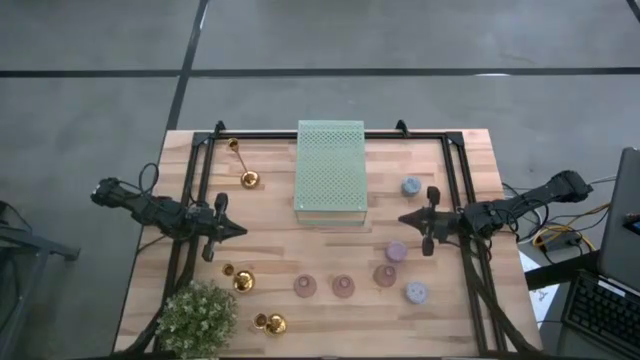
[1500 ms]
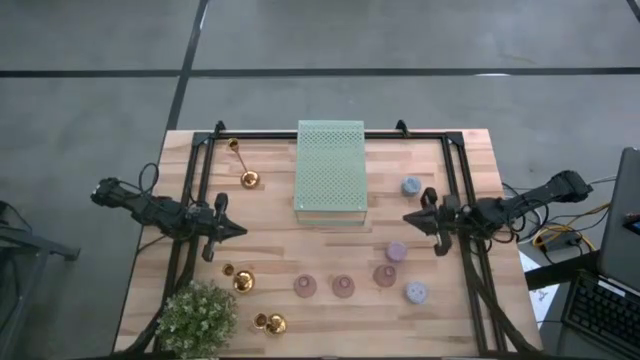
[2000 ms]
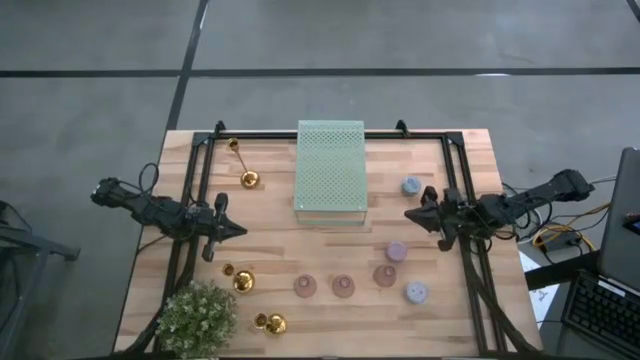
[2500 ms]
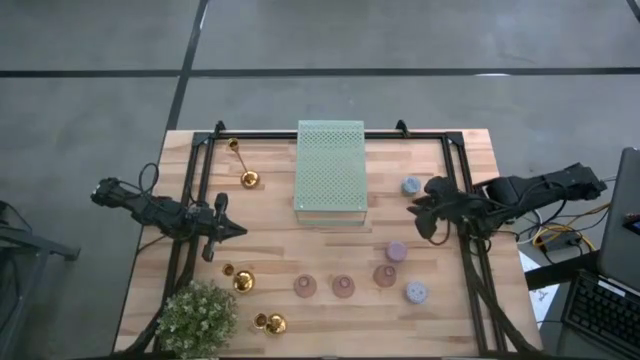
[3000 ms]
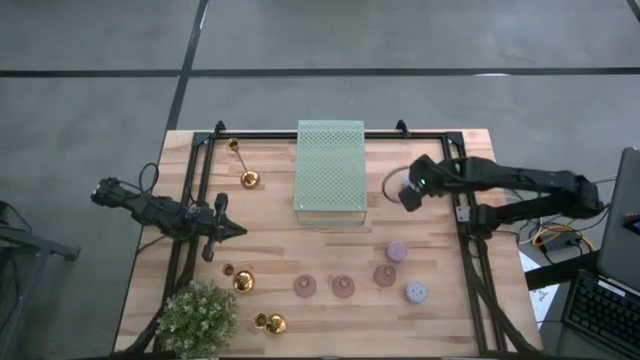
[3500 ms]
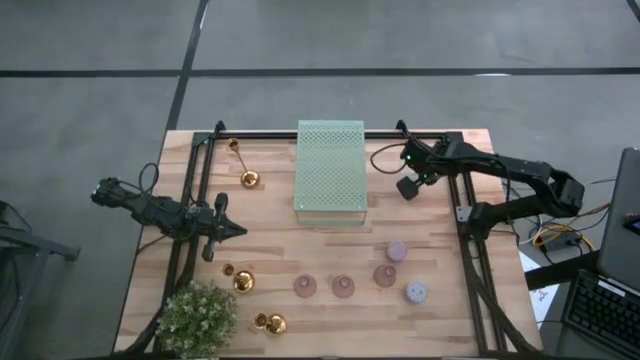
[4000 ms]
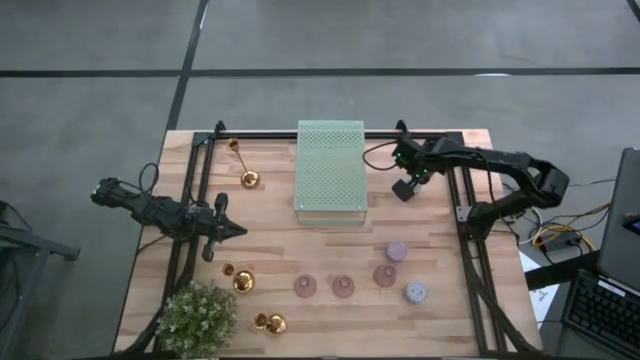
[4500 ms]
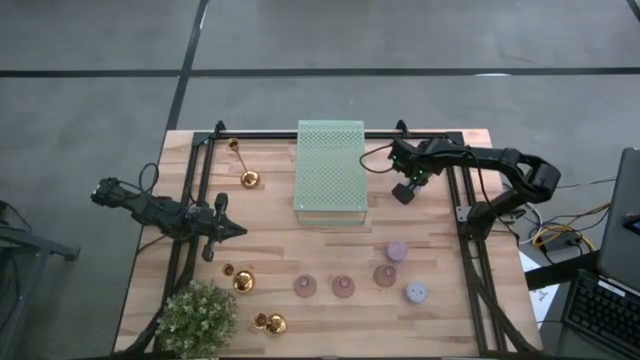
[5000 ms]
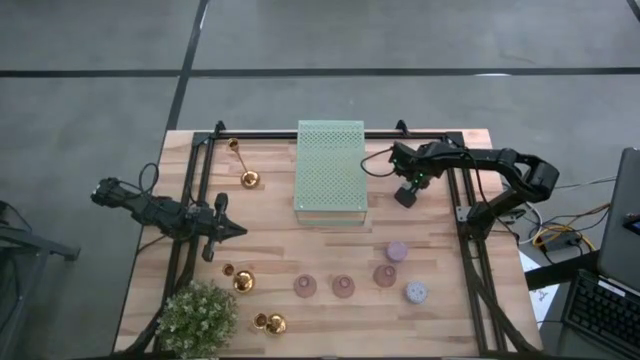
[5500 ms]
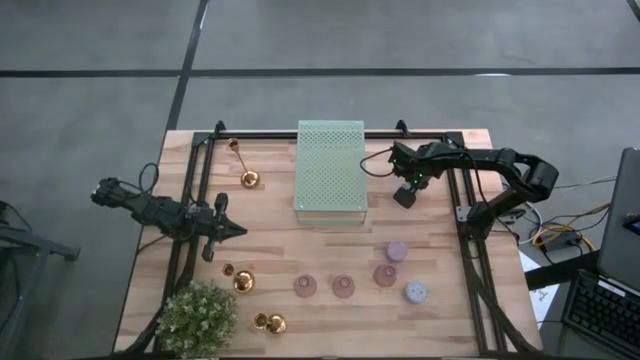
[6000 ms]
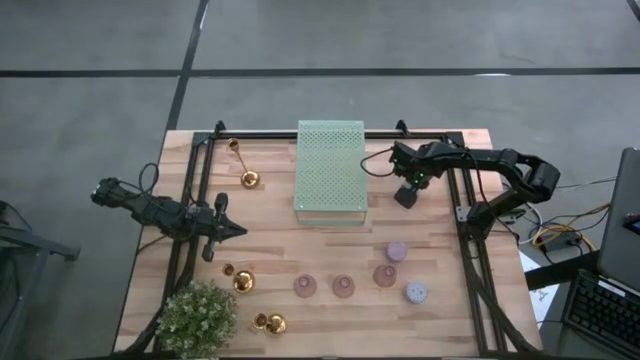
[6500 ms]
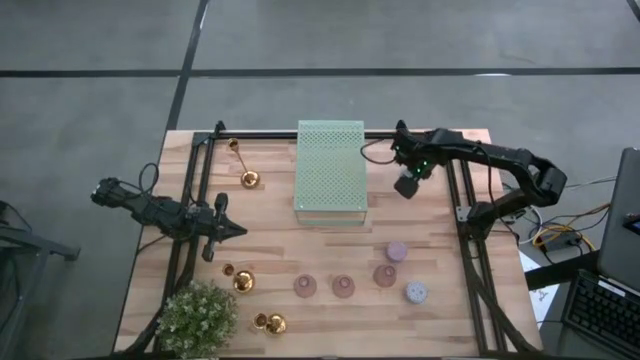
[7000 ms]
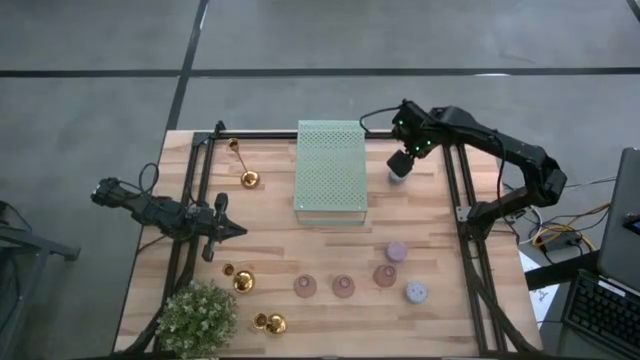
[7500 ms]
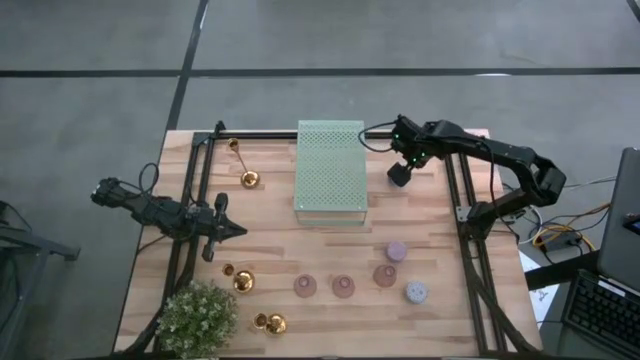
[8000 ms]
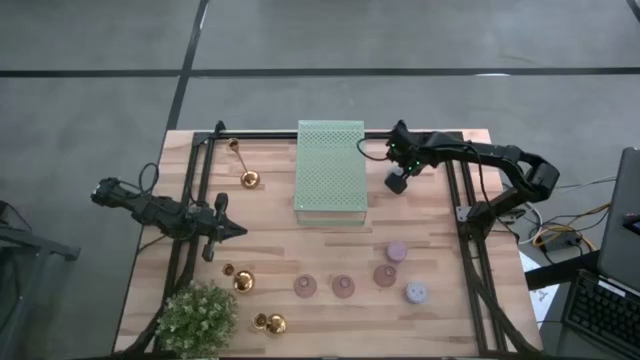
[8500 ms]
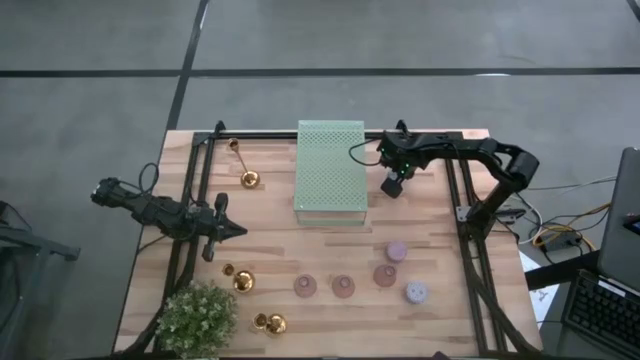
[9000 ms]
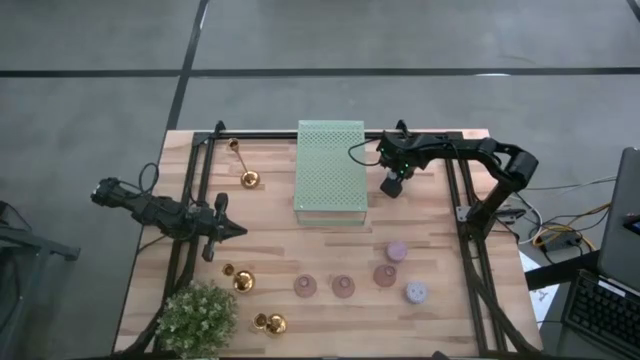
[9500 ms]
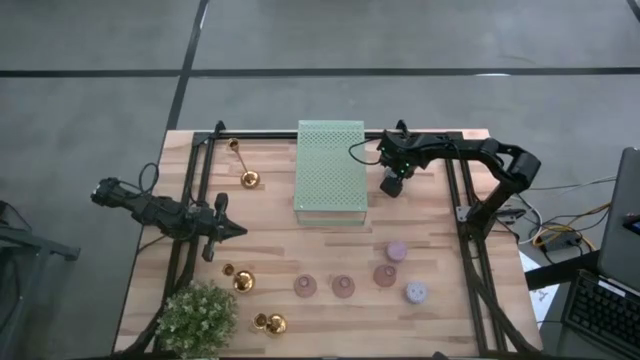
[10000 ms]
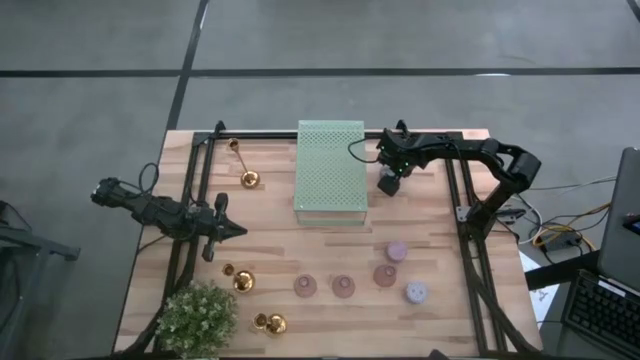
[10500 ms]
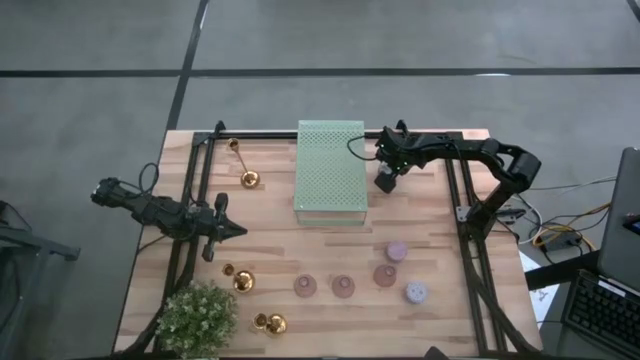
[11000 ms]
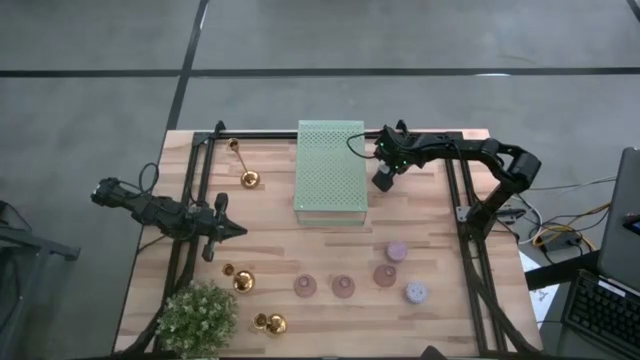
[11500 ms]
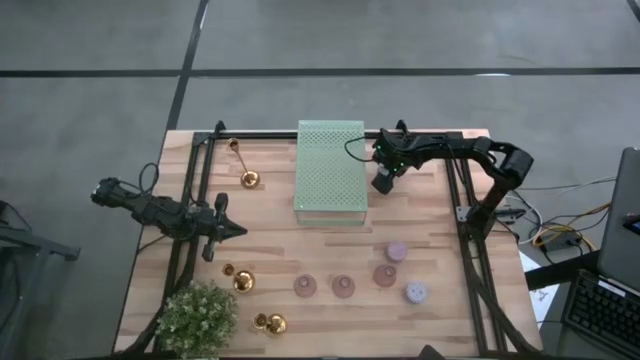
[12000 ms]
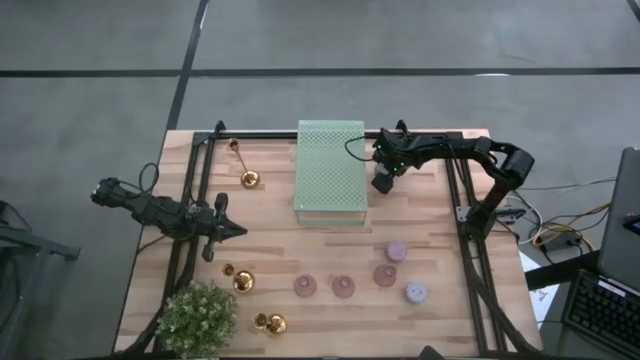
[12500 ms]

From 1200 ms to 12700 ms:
Task: Pick & Place candle stick holders
Put the green scented candle on the shelf

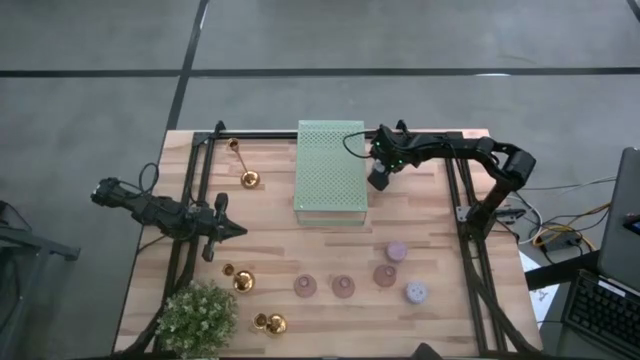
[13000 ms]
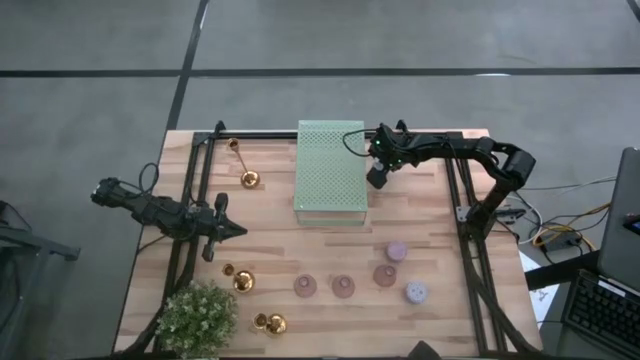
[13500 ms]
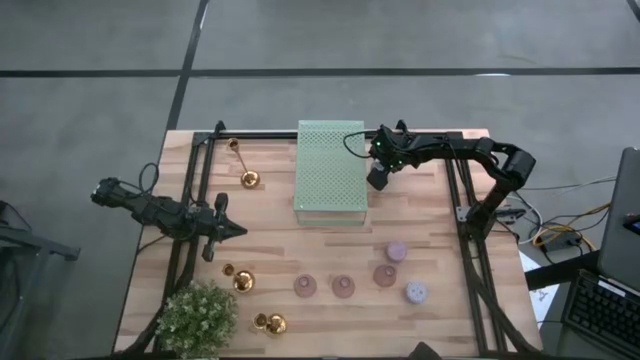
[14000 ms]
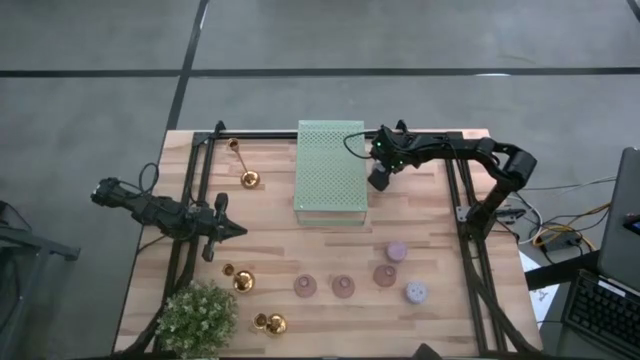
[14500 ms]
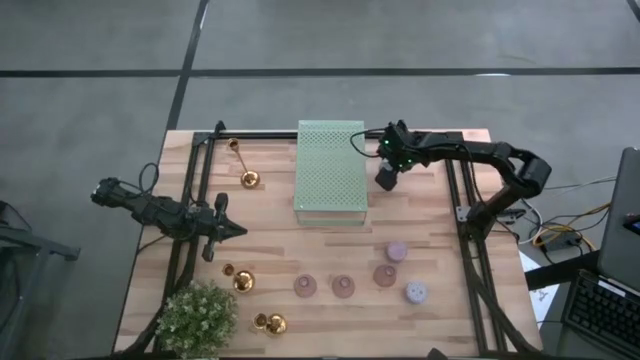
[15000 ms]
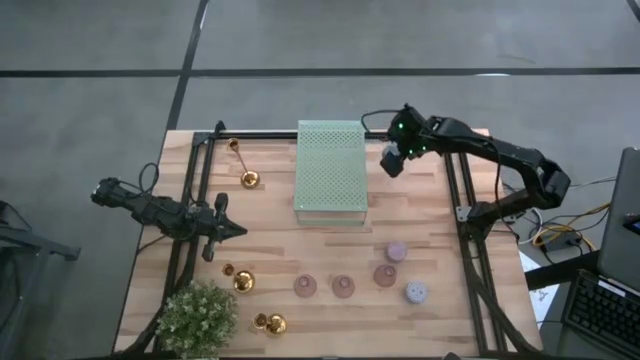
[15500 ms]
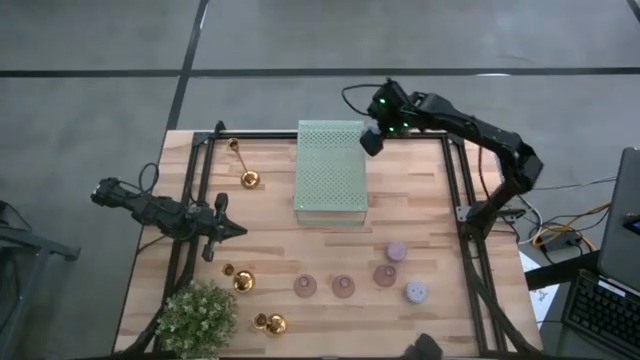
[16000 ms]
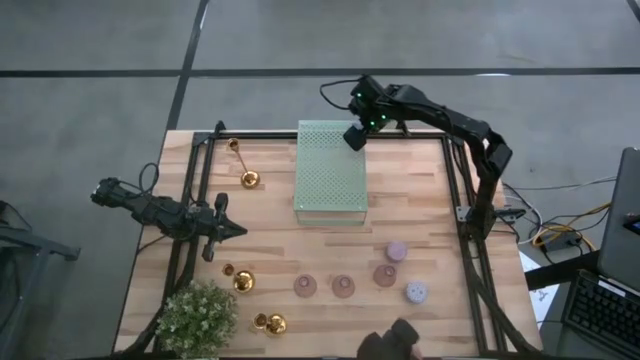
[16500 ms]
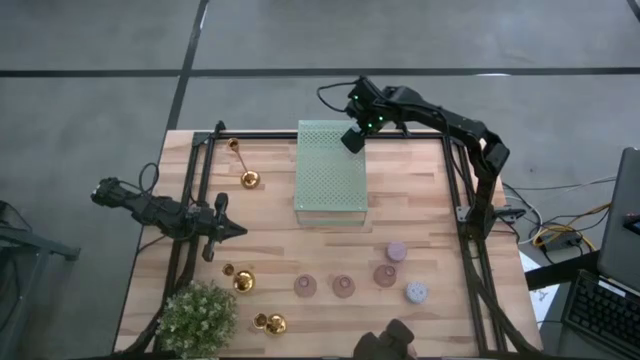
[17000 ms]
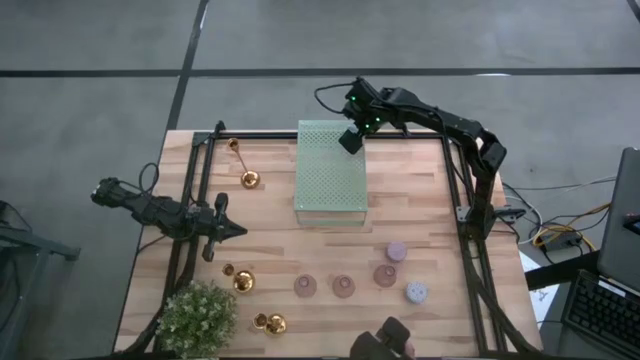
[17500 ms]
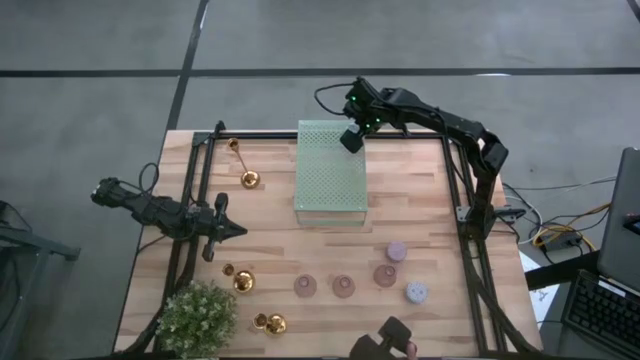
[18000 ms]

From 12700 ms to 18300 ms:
Put the green scented candle on the shelf

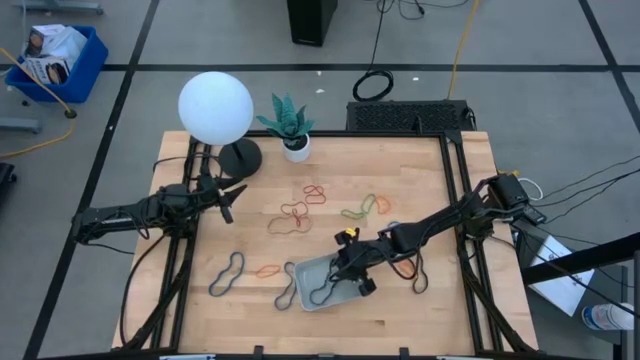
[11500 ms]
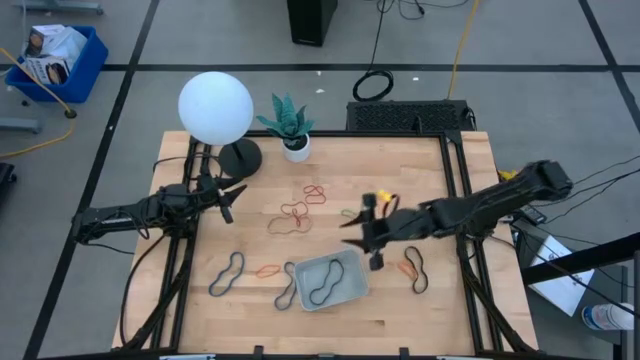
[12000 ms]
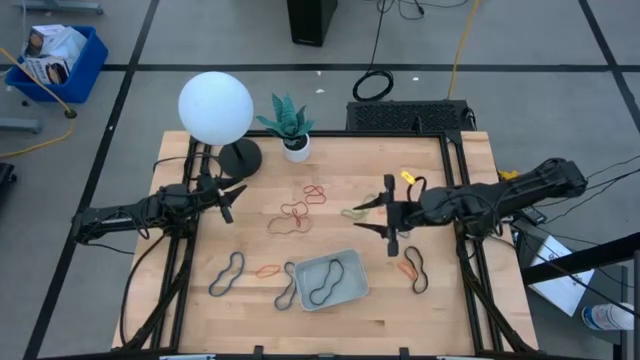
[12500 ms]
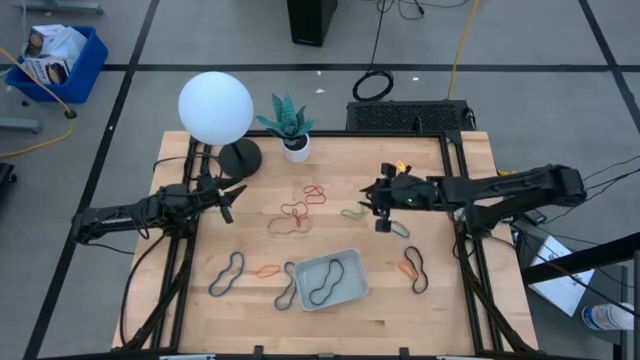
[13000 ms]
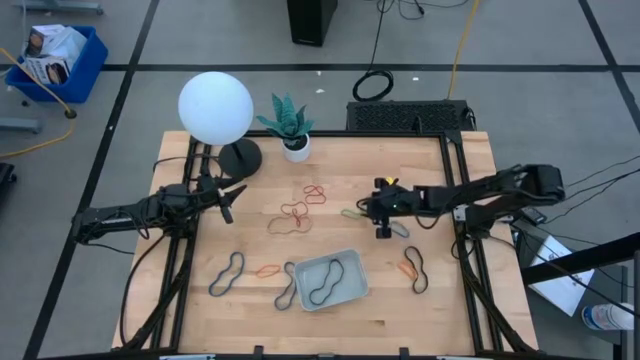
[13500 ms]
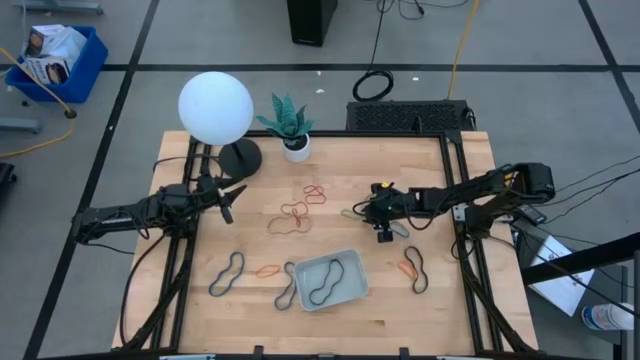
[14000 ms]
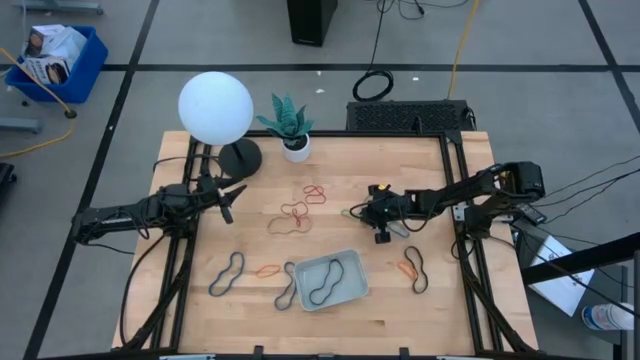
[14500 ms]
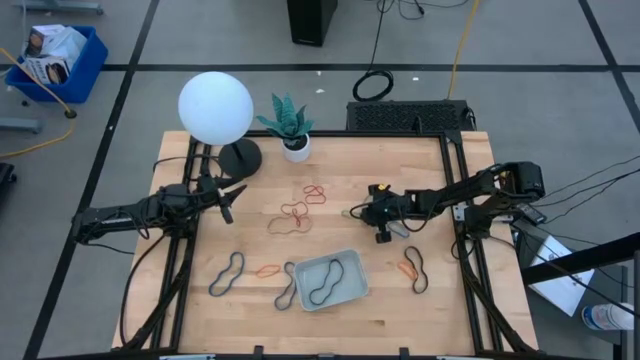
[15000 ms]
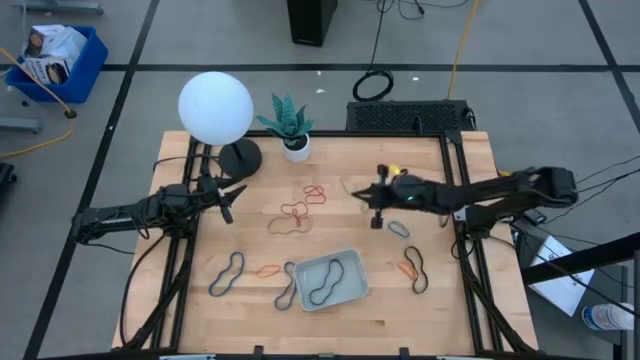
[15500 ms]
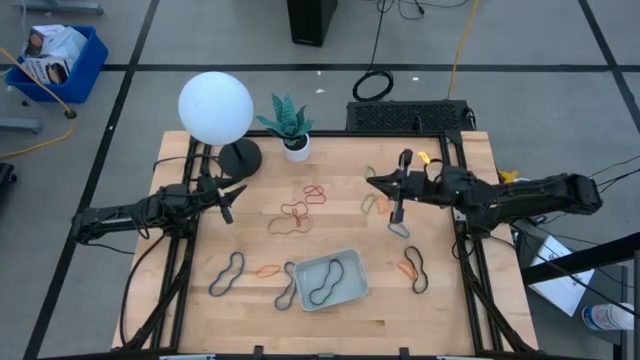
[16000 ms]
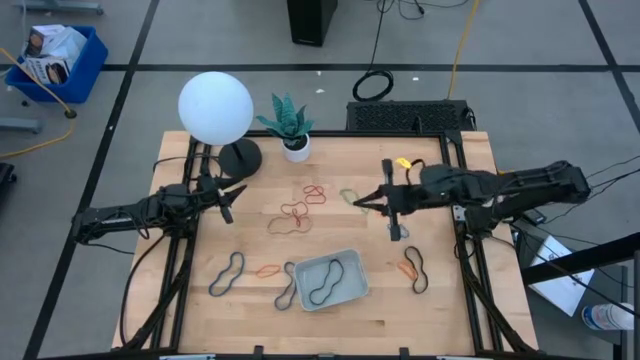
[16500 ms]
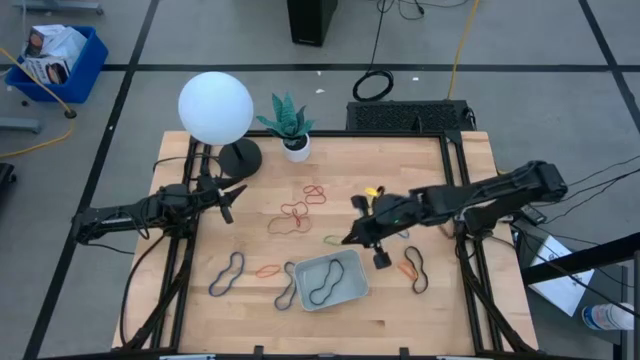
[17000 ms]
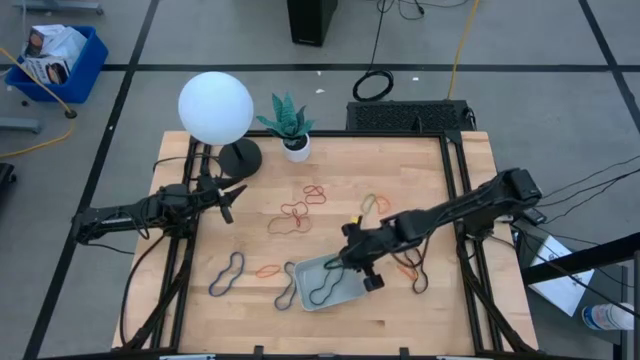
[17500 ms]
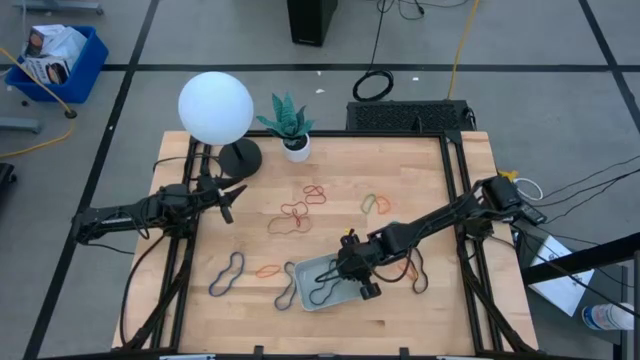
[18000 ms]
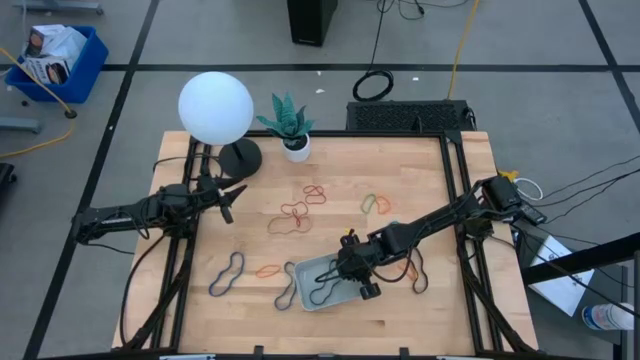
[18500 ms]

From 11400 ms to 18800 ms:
Task: Pick and place rubber bands into bin
Put the left green rubber band into the gray bin
